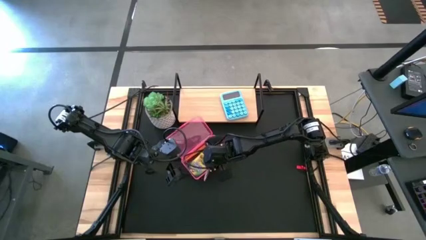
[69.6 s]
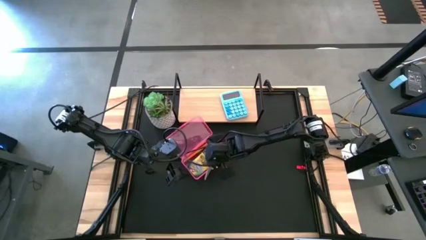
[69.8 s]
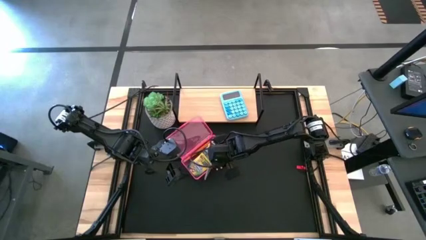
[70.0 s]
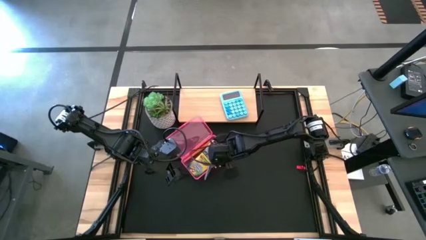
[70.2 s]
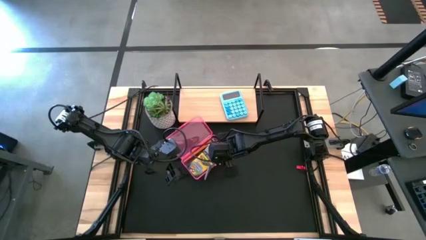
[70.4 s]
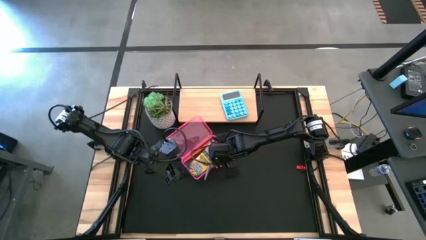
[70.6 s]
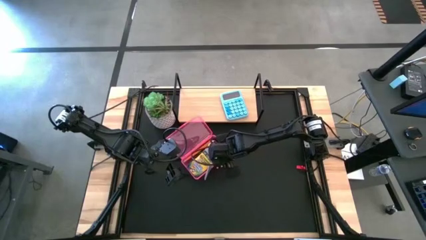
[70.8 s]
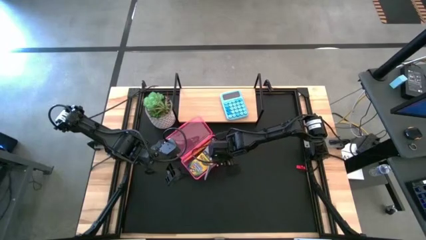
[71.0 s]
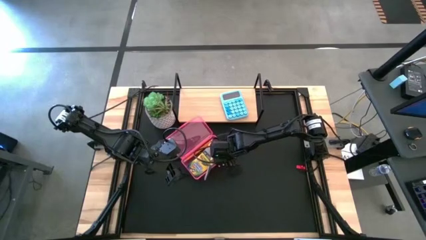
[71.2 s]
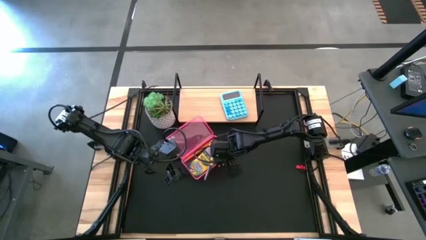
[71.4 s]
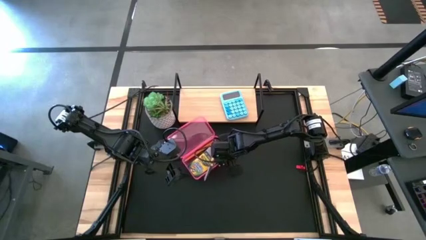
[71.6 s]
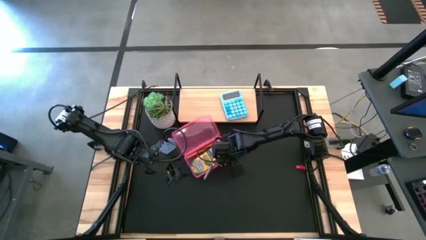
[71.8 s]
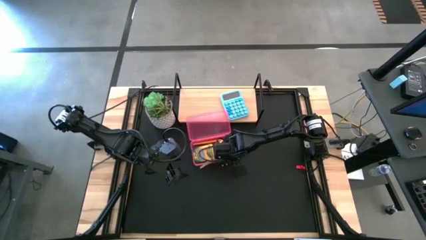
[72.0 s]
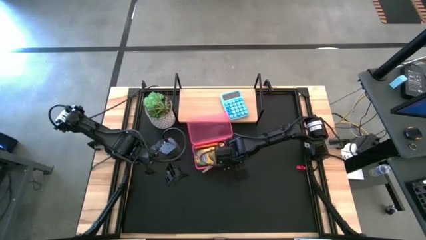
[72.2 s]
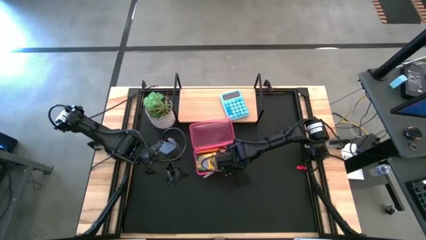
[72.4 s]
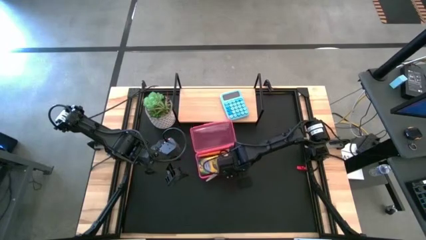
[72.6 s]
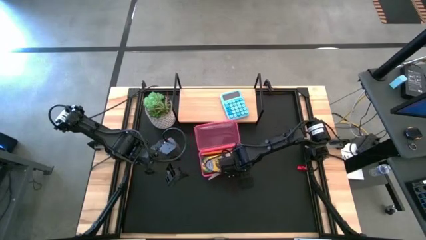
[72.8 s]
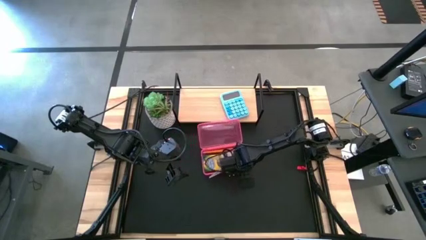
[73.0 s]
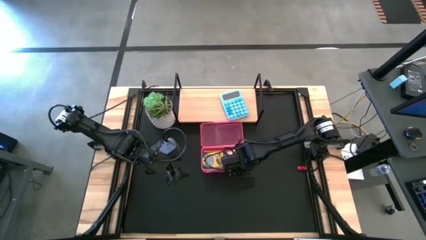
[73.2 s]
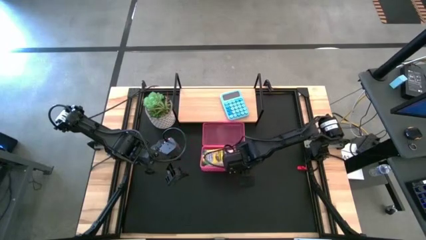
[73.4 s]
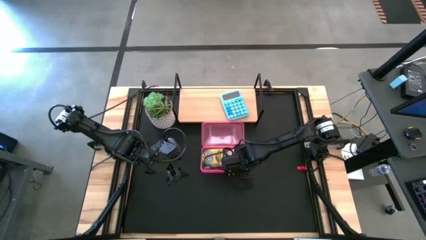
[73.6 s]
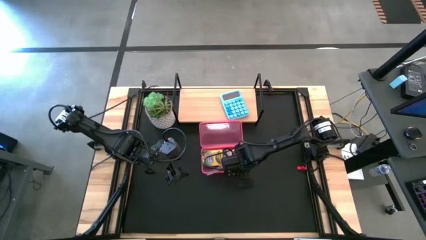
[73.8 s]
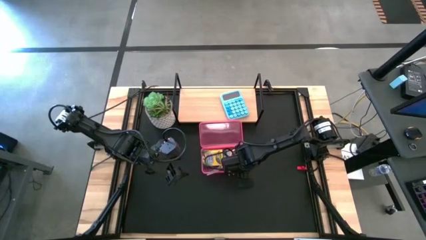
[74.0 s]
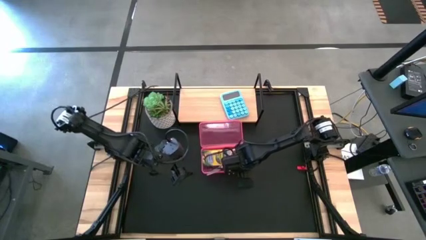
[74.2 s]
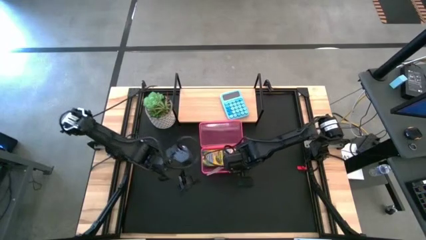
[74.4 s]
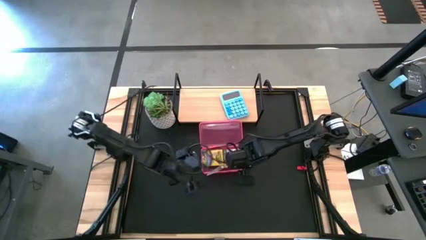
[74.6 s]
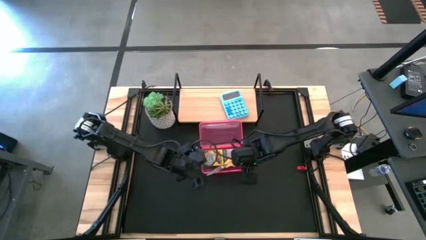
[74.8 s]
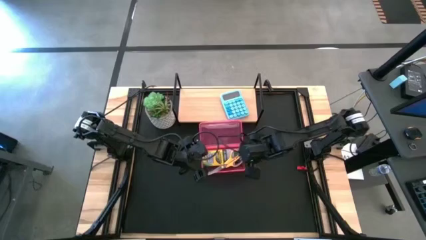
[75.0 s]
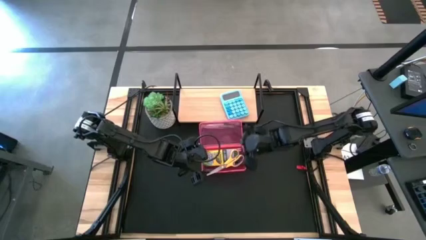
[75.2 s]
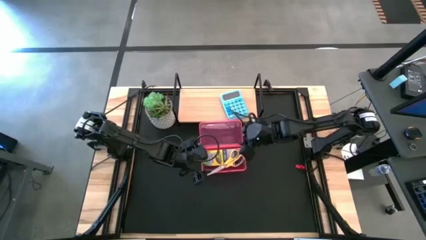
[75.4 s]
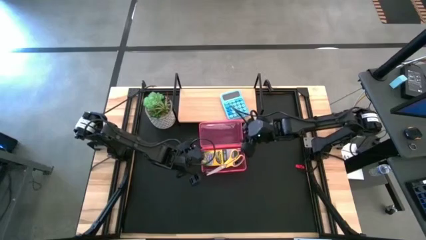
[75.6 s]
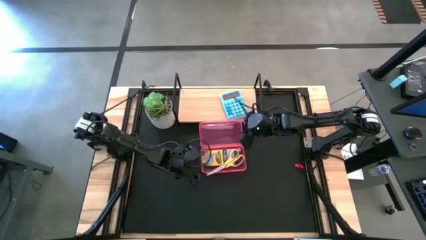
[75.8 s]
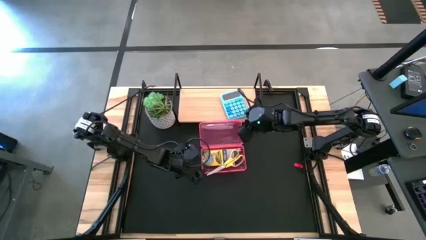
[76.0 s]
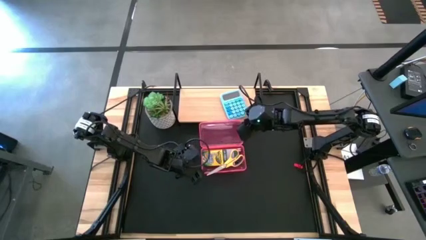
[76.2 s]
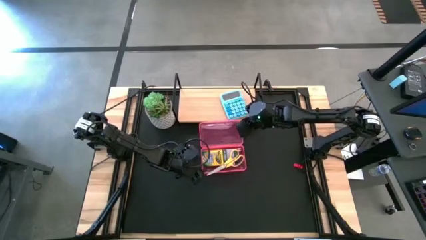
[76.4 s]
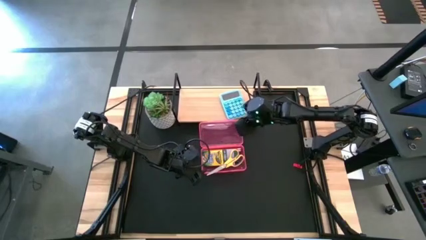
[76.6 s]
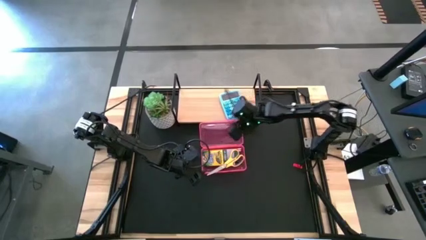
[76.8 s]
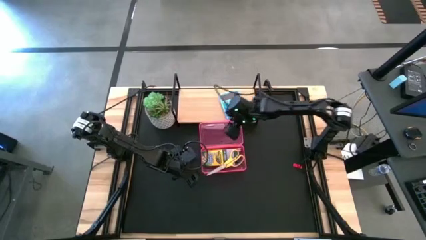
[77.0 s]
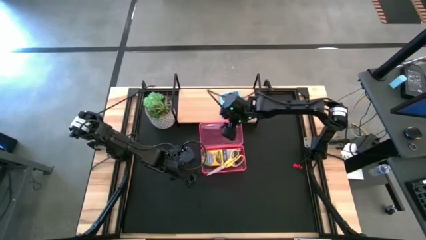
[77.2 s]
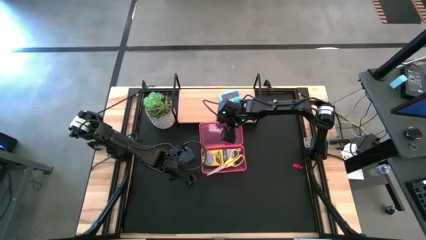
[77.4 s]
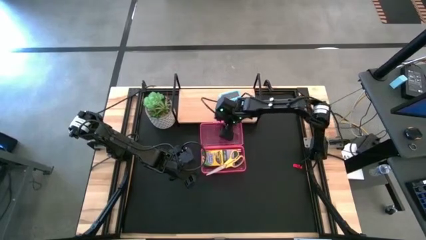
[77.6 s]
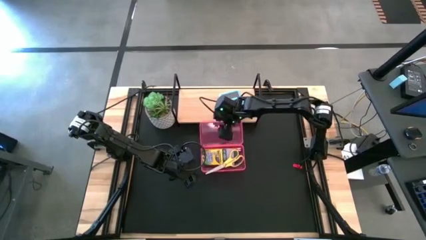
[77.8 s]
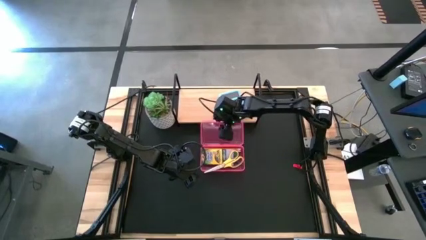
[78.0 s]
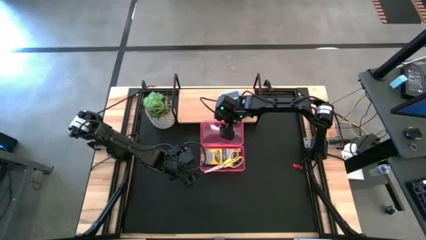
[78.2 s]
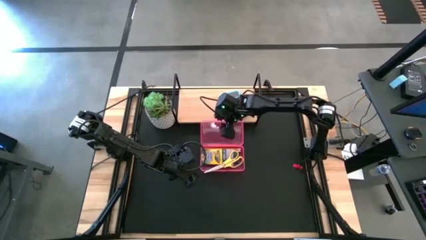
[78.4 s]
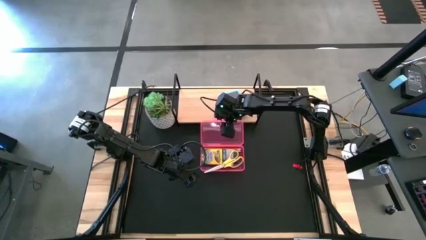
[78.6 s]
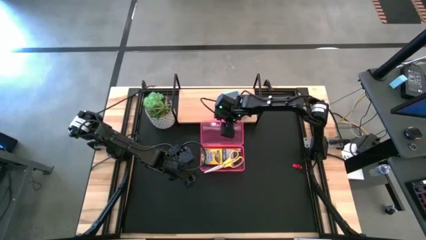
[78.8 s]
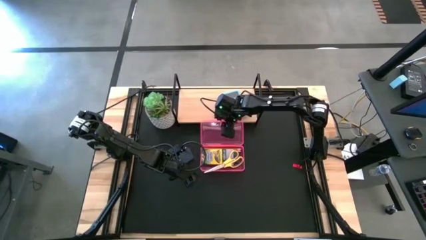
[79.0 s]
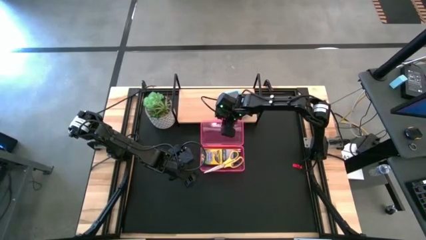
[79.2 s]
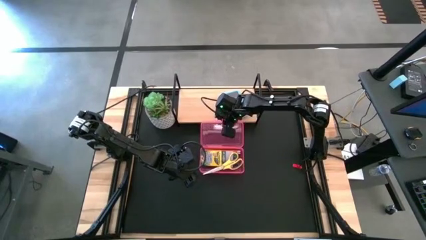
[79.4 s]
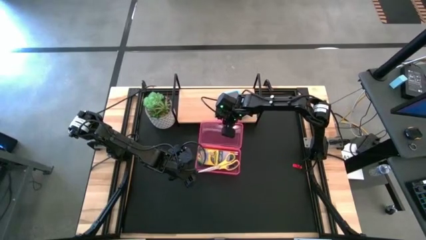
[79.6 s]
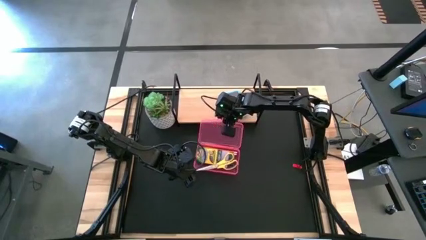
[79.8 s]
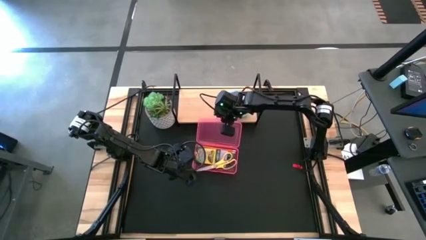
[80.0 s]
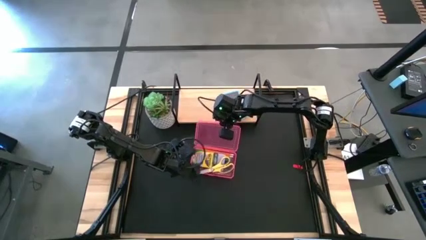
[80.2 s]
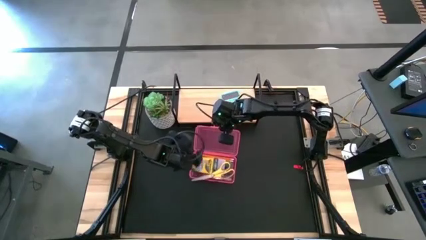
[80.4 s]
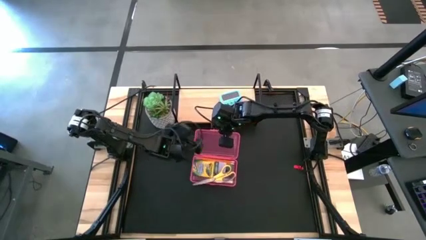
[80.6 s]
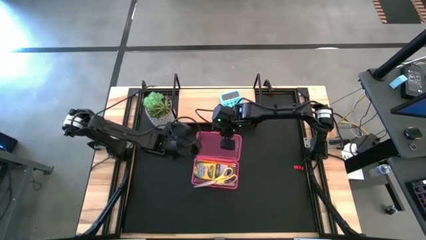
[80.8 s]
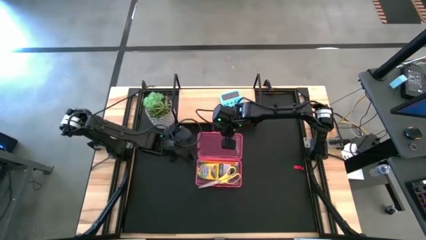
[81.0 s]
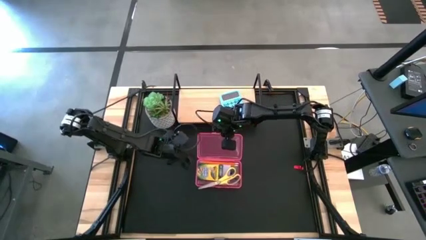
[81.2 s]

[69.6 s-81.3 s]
Task: Pack school essentials
Close the red supply box

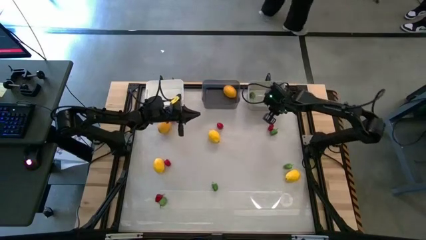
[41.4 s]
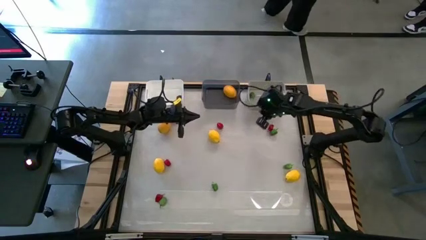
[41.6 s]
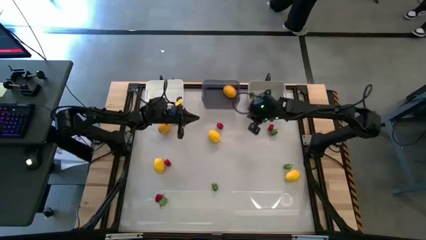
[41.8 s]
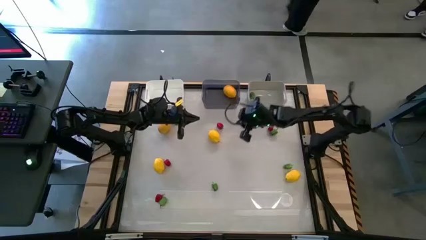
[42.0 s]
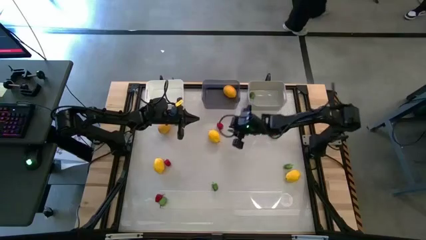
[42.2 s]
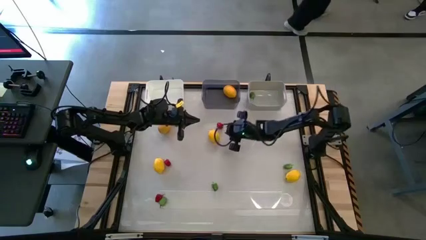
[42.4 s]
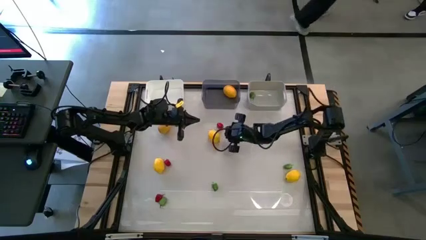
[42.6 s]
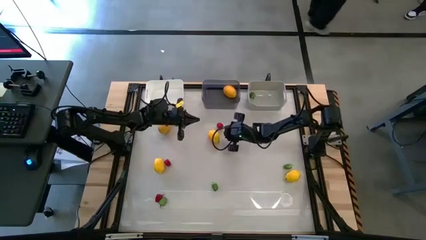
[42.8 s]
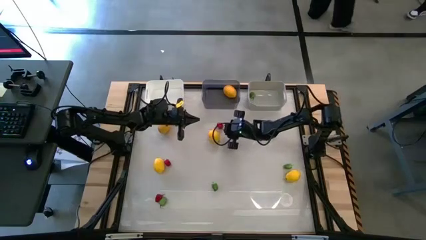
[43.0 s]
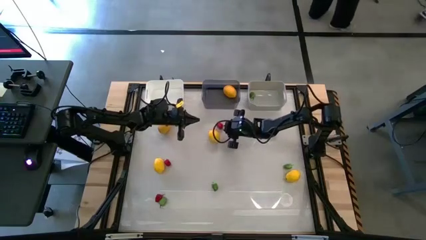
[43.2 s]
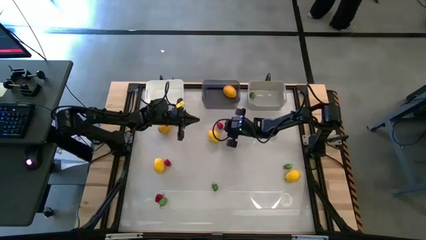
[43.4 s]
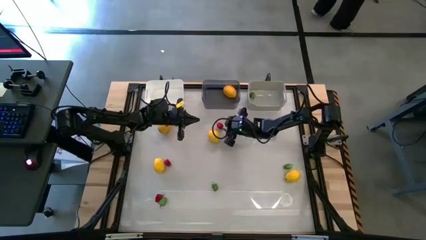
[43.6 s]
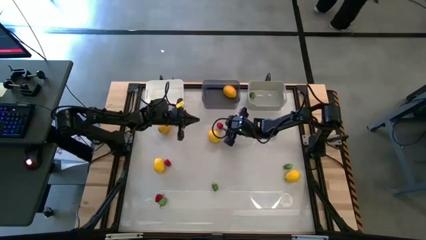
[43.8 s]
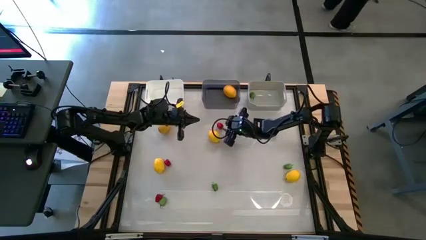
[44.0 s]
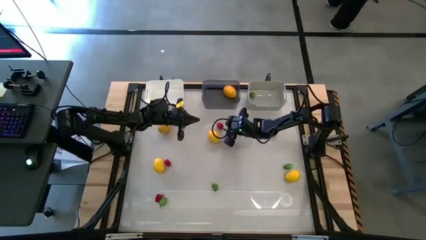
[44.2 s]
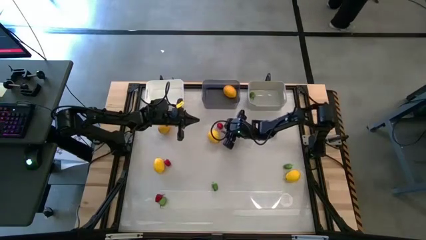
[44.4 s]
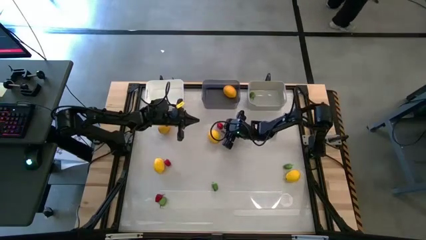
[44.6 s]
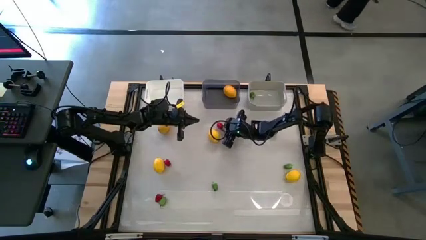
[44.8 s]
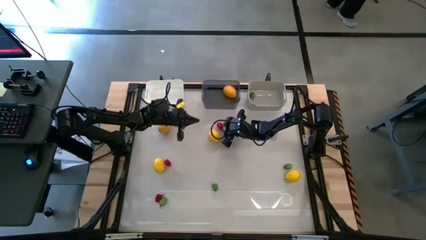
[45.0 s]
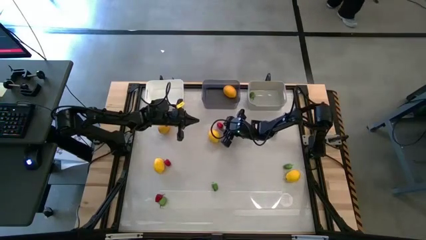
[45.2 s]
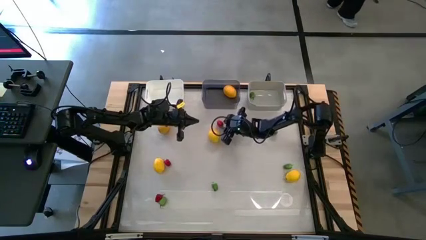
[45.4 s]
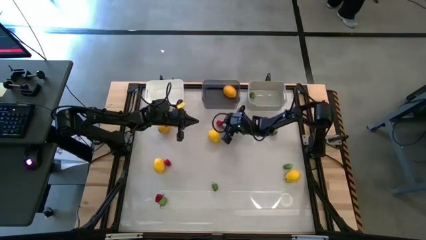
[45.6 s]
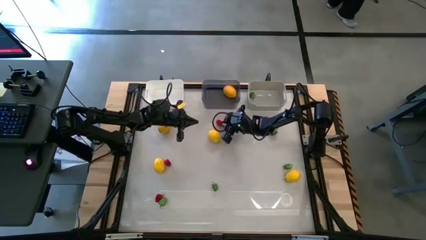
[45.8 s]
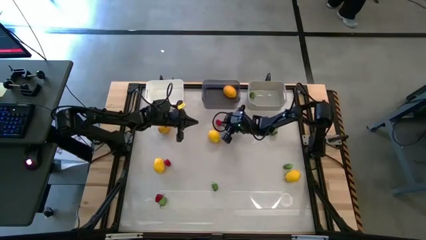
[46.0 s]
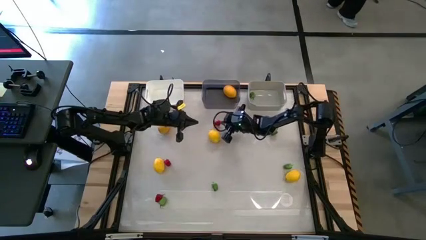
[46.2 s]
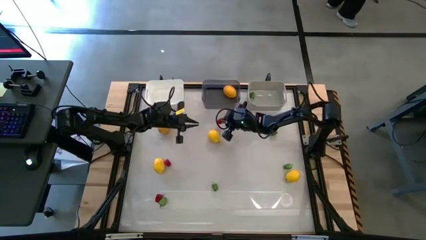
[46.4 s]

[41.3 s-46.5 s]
Task: Sort produce into baskets
Put the red bell pepper into the white bin
